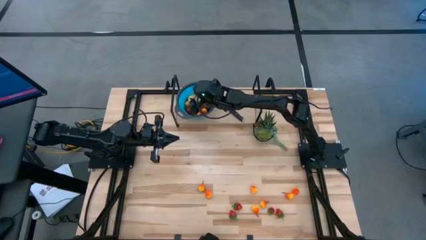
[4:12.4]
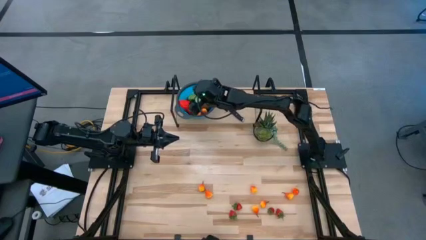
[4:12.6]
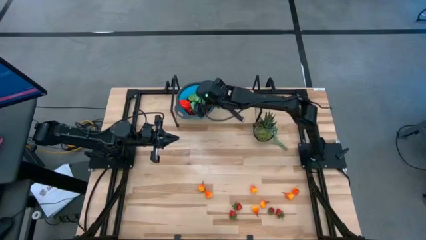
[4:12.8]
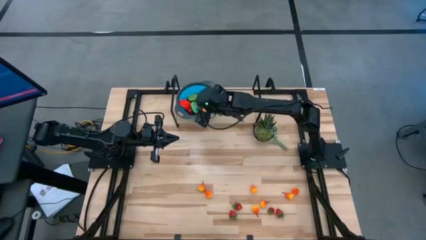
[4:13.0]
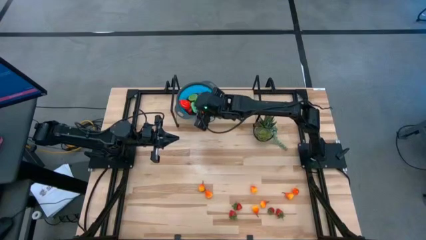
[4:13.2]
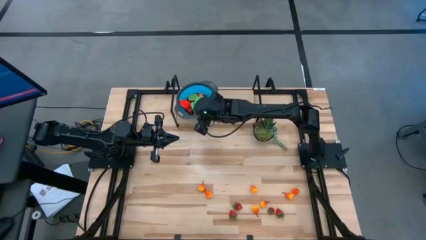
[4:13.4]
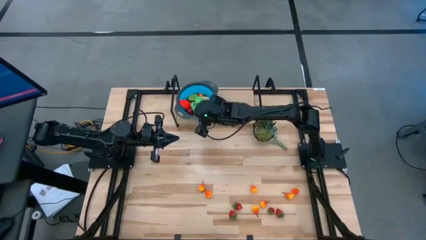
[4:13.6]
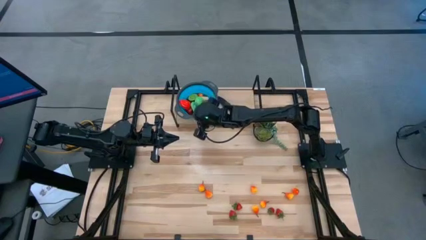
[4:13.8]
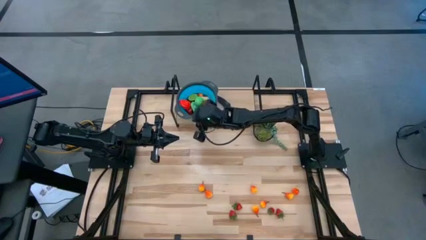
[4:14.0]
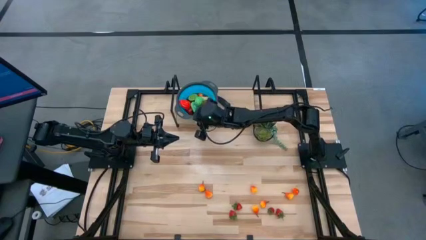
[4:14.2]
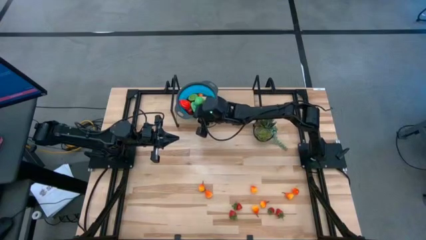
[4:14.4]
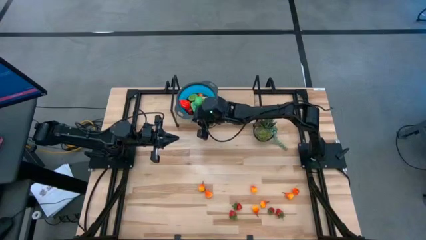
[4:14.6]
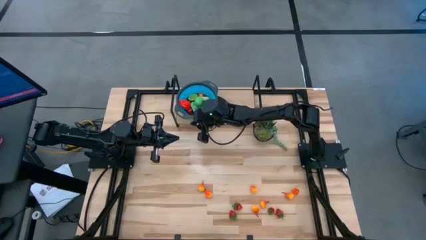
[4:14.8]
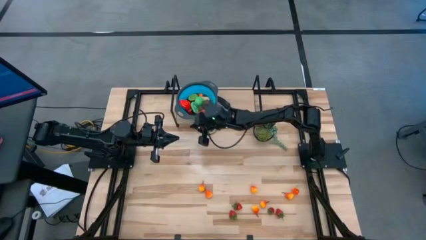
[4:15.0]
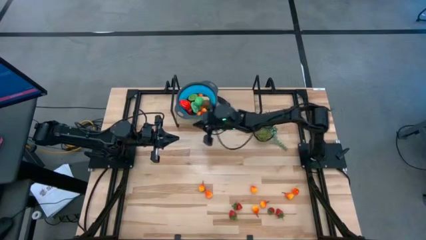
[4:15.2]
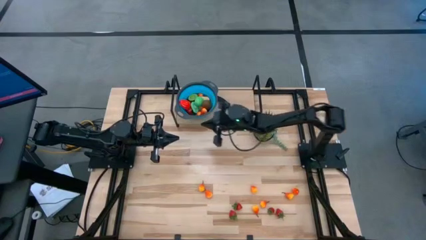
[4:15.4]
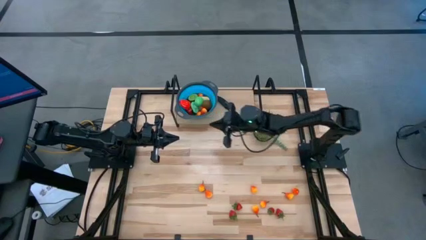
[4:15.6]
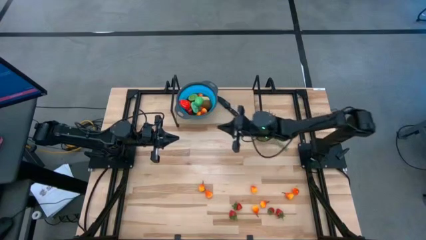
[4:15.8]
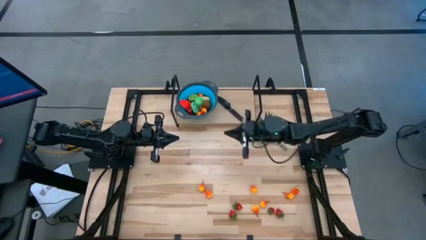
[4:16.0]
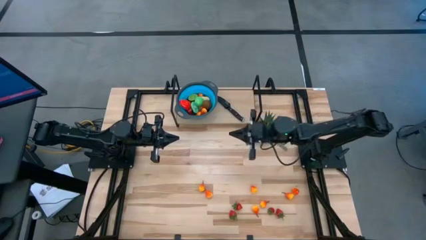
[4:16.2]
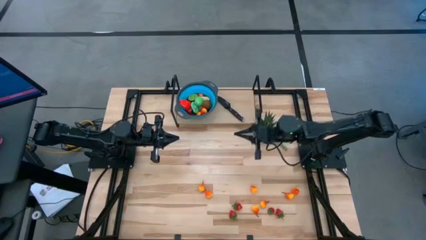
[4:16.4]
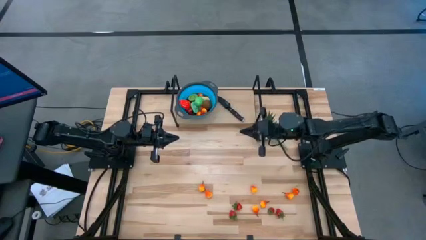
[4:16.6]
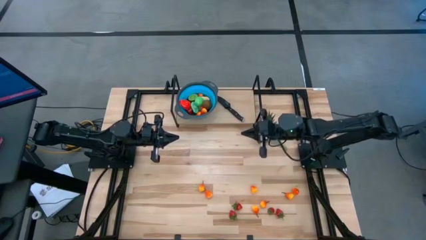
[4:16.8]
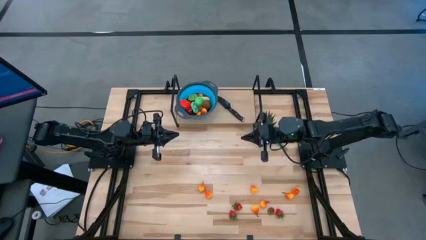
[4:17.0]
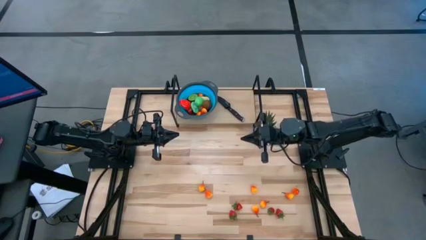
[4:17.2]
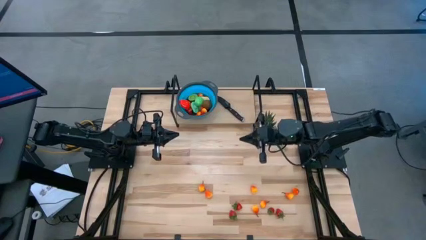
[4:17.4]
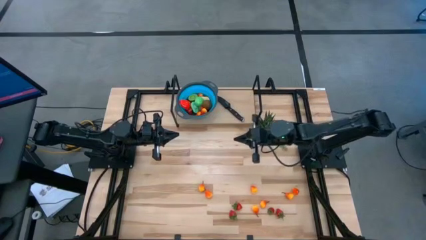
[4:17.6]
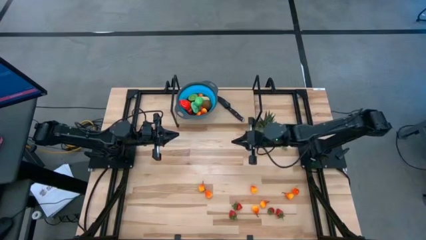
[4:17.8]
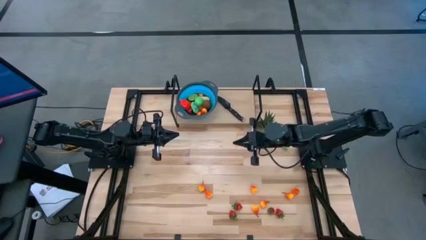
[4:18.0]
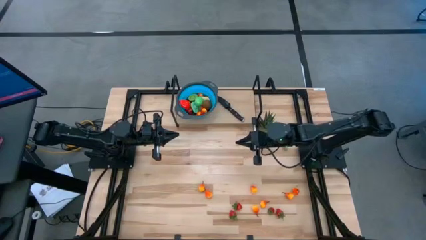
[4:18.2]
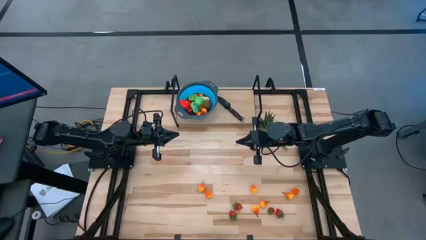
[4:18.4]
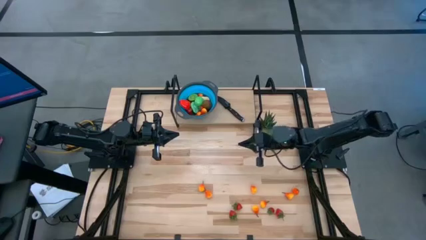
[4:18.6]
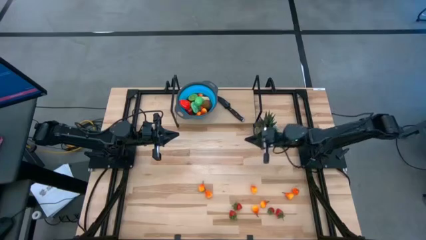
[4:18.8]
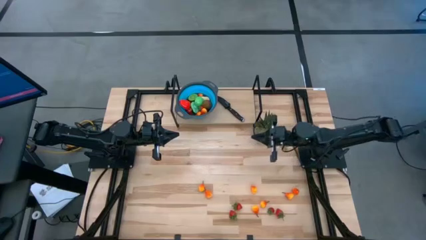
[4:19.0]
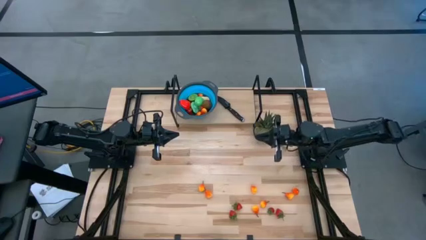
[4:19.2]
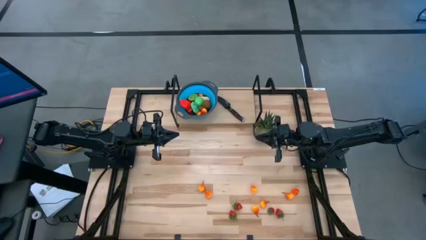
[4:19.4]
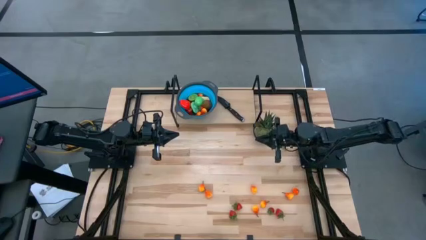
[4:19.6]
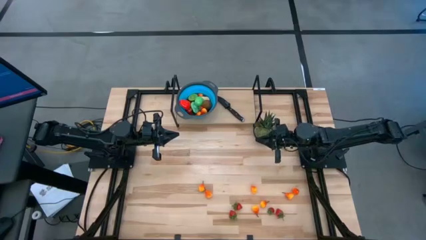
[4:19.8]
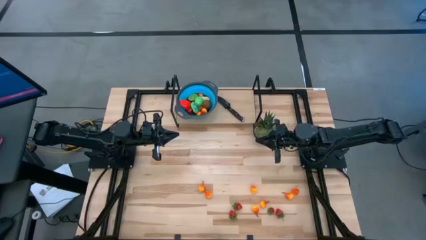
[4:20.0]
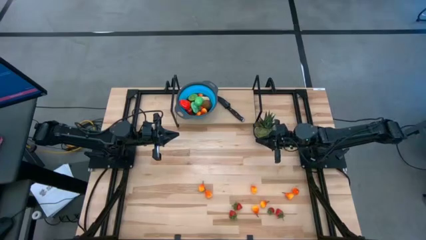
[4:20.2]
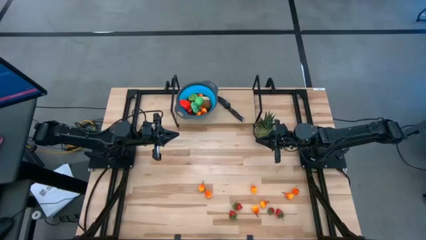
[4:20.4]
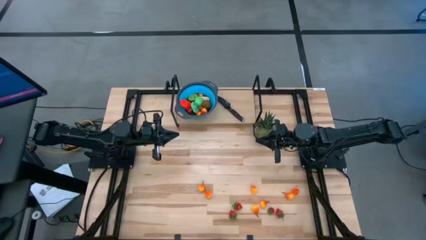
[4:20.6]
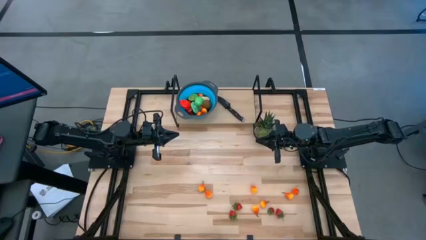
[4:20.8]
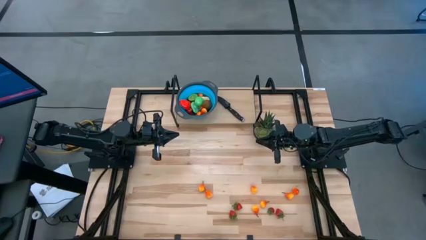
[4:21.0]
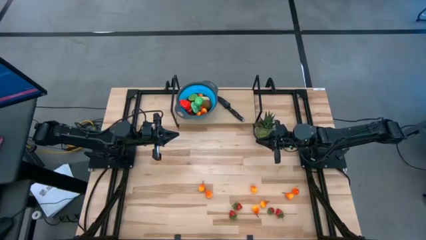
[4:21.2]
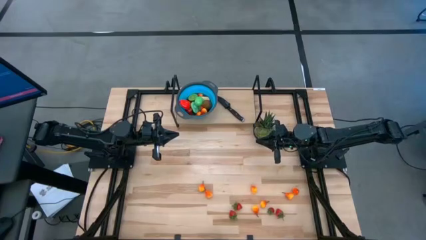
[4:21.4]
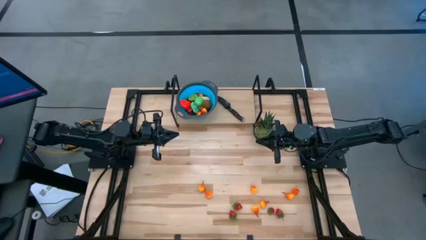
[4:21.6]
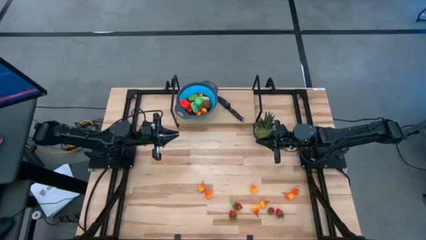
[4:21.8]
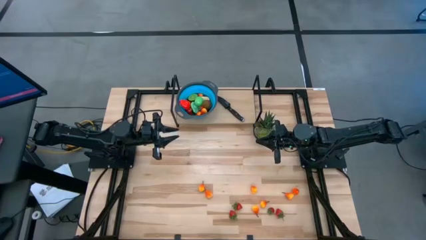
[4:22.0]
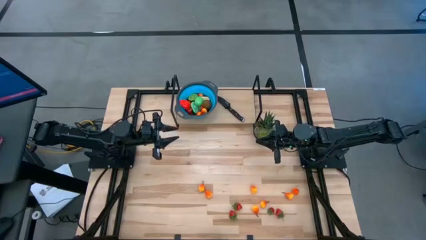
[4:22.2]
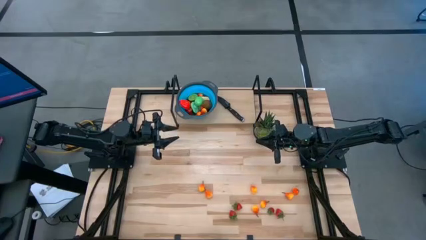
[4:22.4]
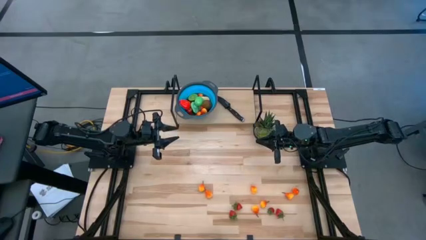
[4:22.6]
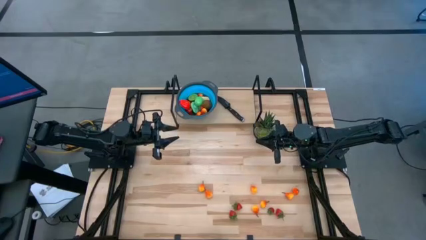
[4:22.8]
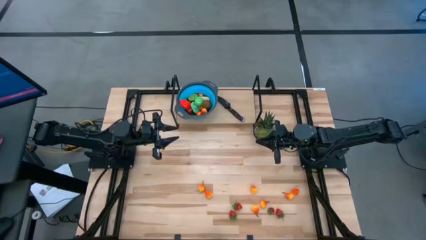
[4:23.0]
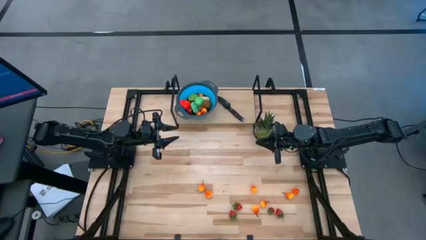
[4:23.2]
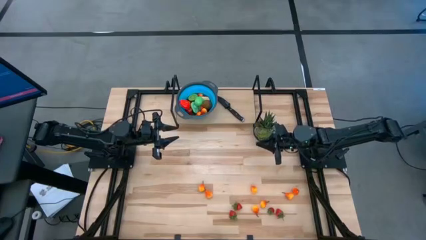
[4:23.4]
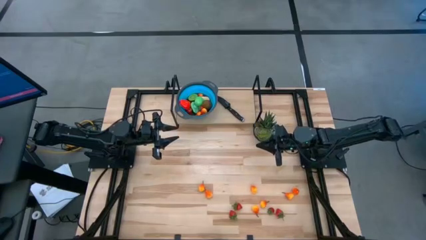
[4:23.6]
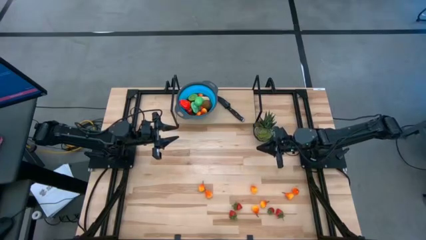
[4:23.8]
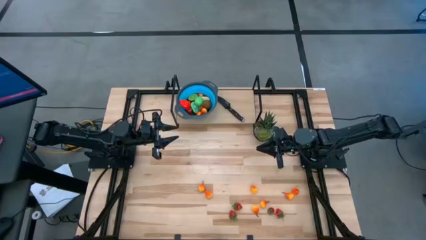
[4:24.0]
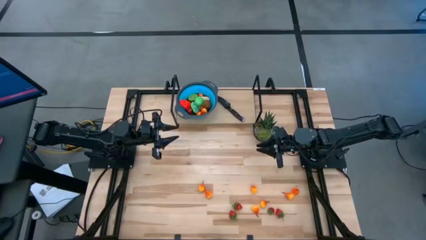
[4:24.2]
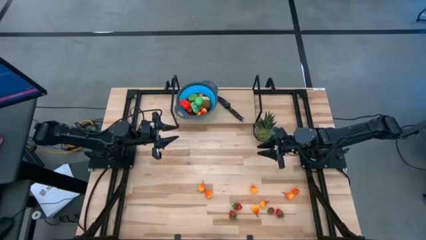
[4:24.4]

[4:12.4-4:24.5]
Task: Pick & Place Fruit
Put the pear into the basket

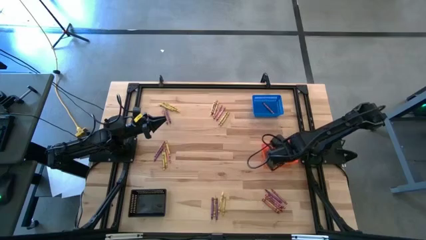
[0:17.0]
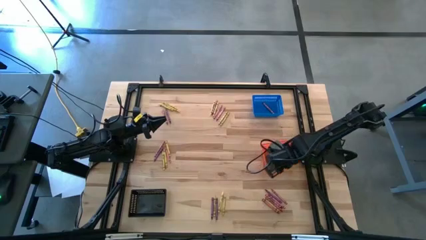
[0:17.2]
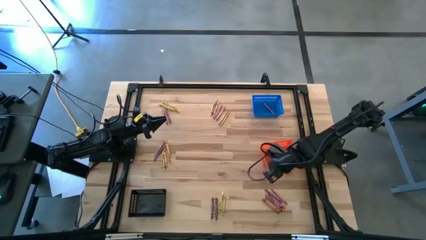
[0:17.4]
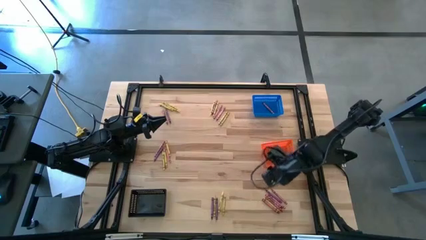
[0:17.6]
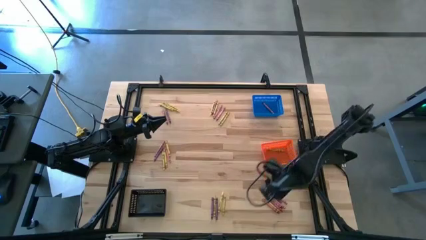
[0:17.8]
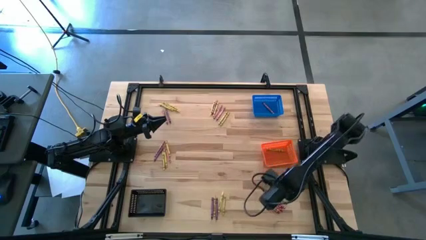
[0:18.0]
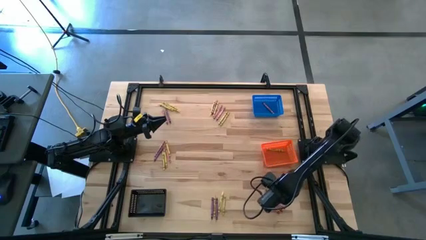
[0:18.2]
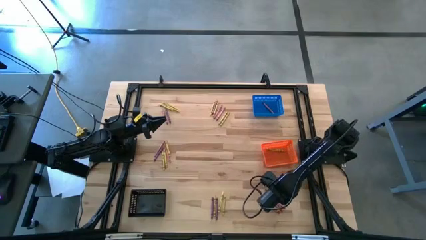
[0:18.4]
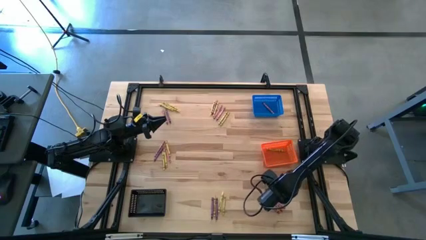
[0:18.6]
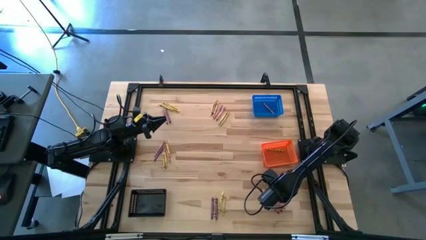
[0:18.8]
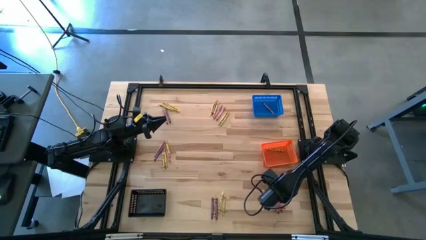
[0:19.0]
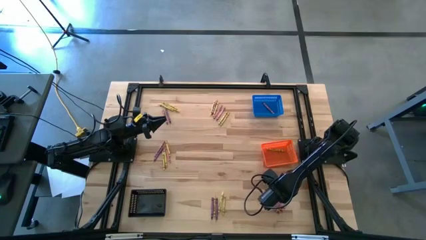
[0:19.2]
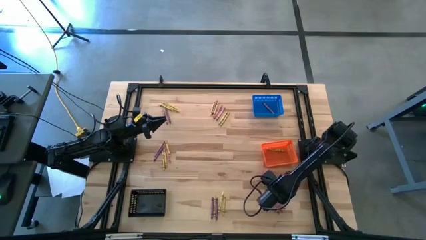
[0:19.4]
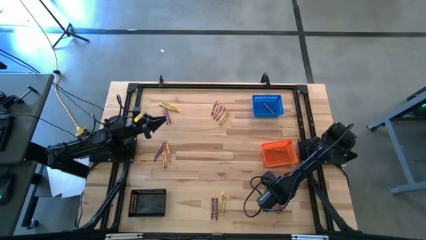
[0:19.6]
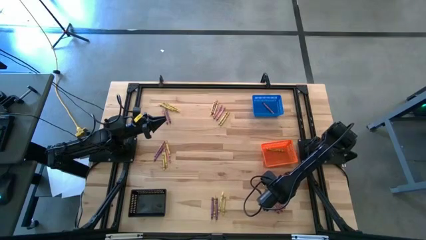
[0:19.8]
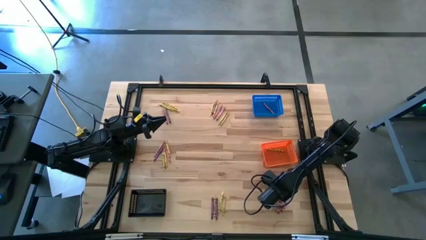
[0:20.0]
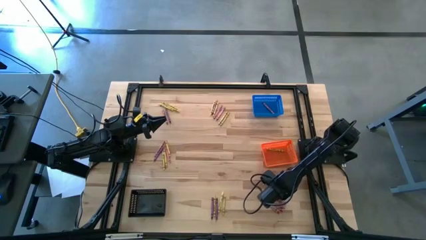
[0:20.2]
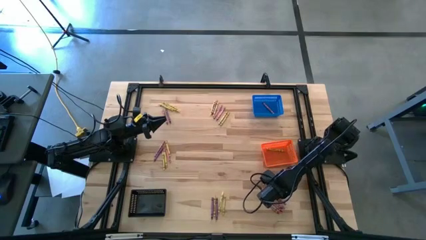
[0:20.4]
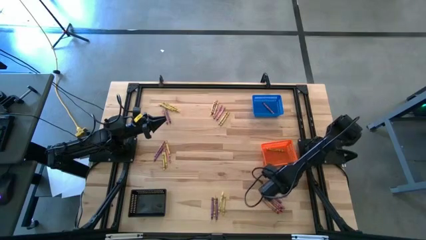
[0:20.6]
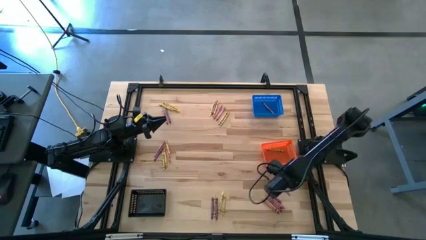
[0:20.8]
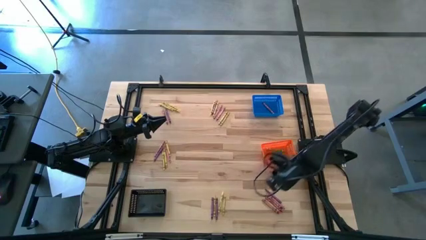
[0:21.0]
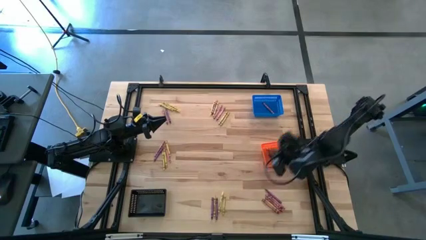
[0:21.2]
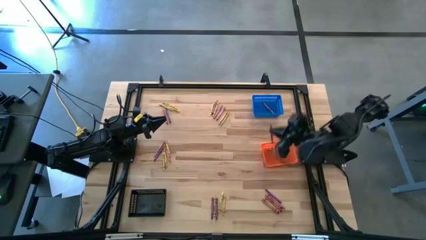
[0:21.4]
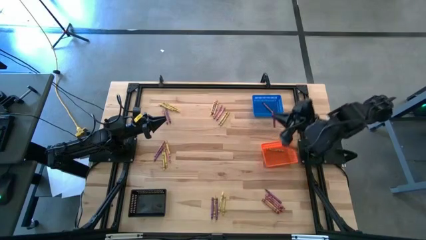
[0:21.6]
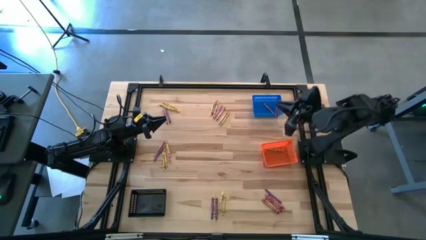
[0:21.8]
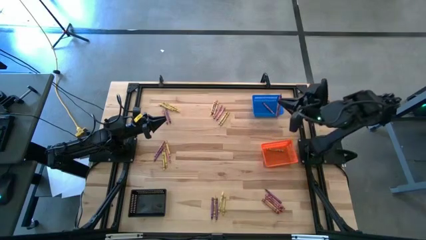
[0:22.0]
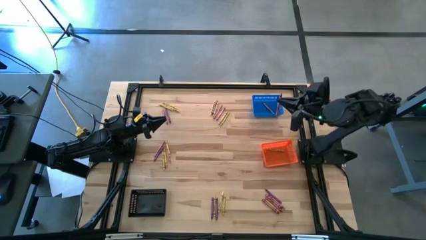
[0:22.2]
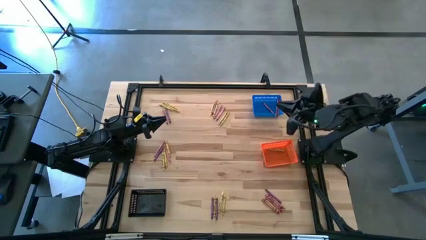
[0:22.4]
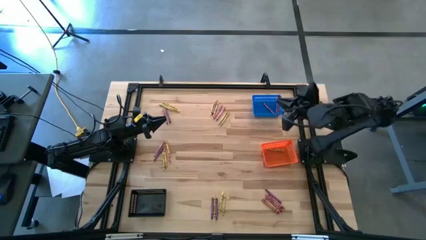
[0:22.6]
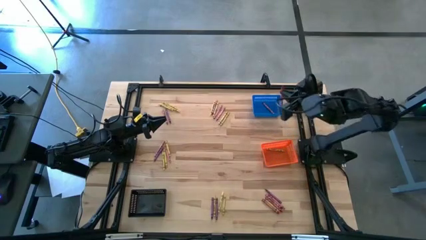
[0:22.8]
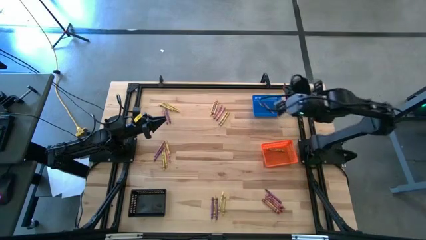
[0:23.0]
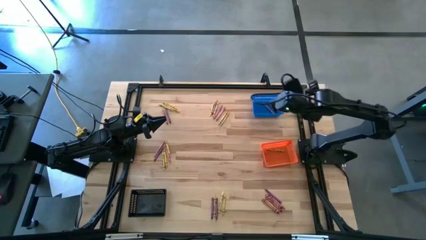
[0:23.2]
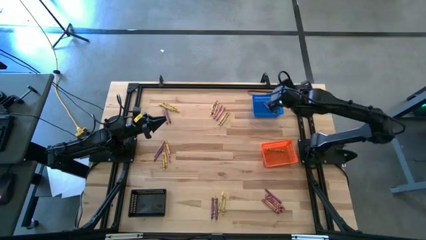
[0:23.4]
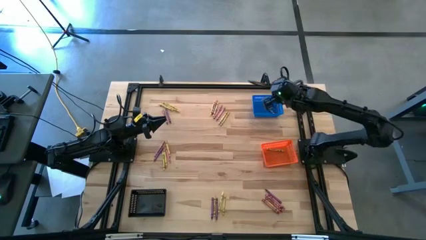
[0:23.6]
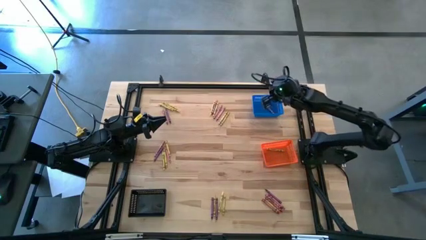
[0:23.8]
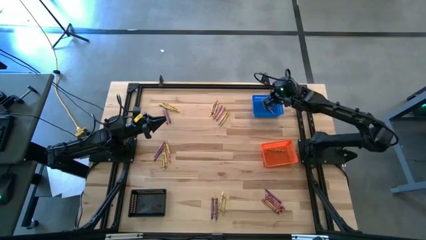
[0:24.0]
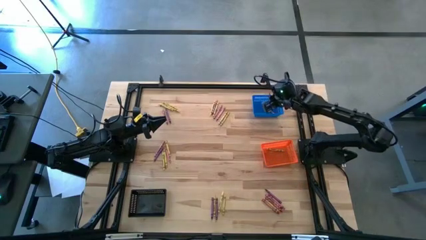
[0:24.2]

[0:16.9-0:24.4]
Task: Sort crayons
Put the red crayon into the blue basket
